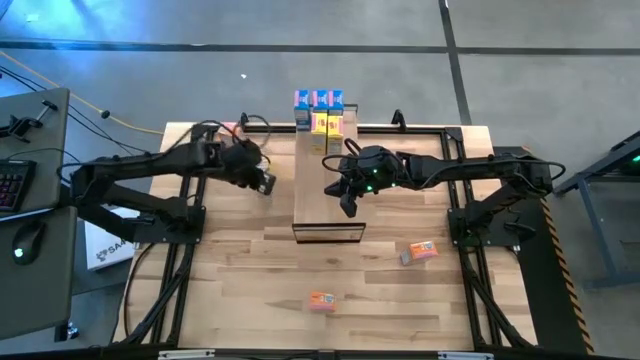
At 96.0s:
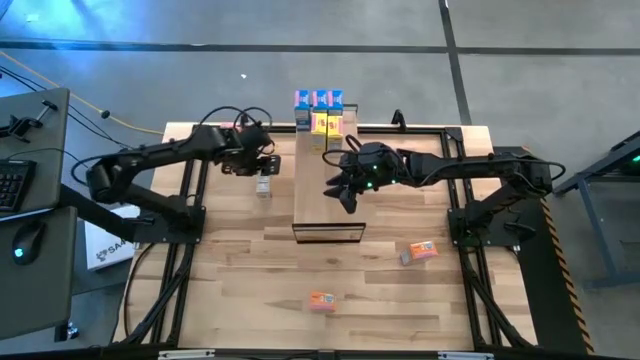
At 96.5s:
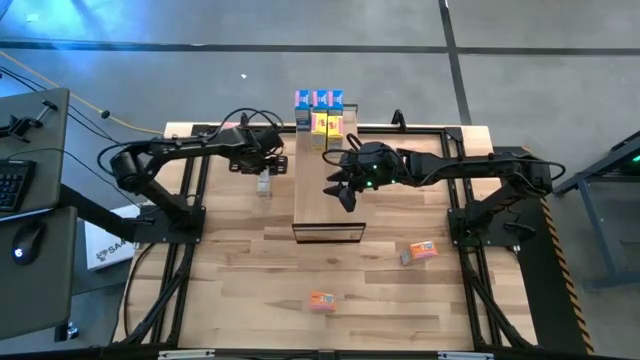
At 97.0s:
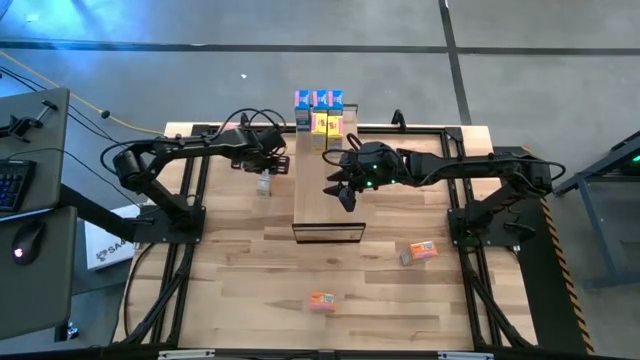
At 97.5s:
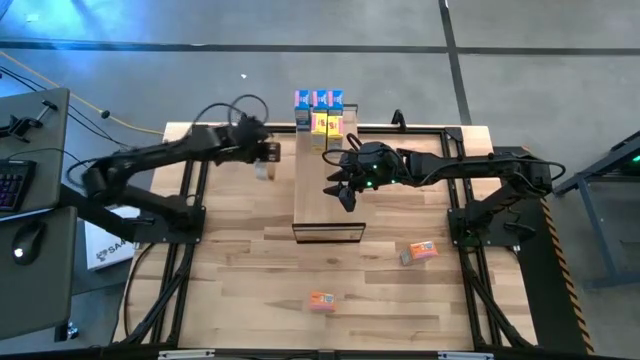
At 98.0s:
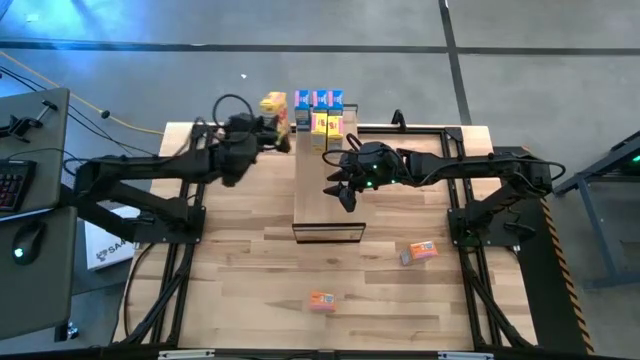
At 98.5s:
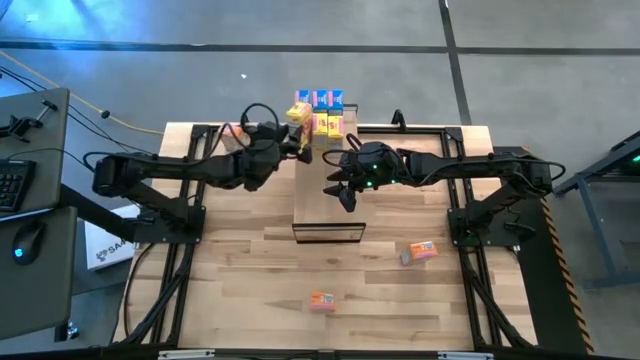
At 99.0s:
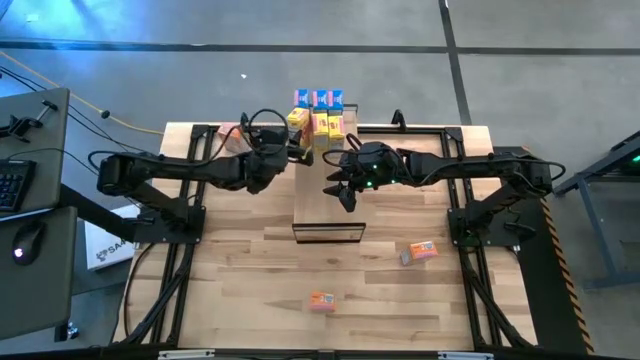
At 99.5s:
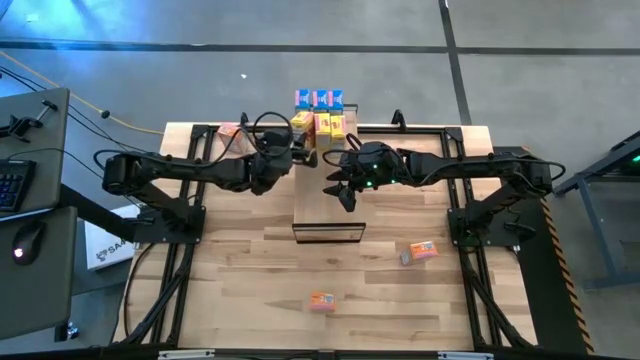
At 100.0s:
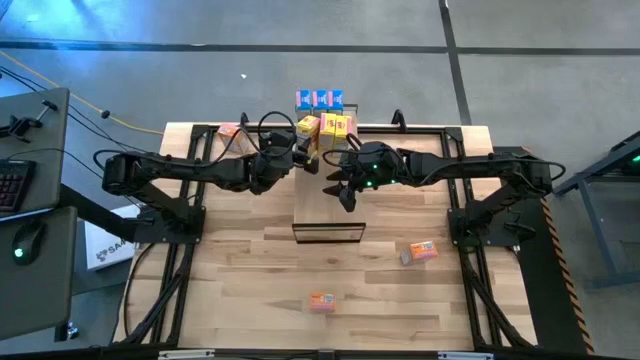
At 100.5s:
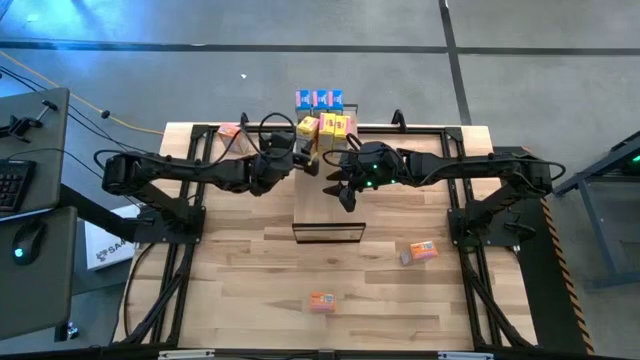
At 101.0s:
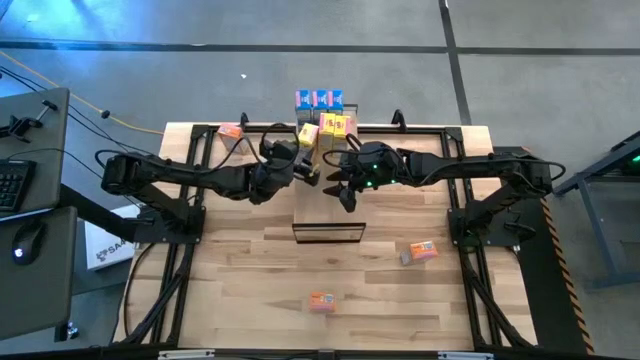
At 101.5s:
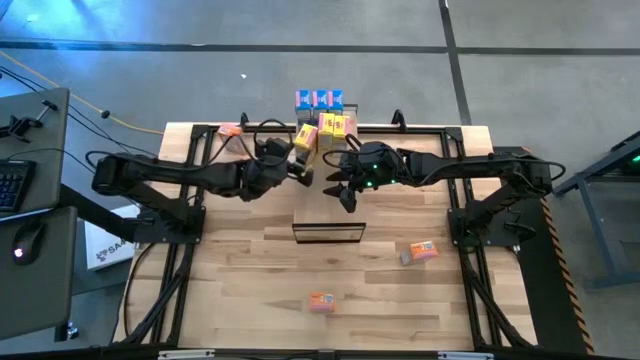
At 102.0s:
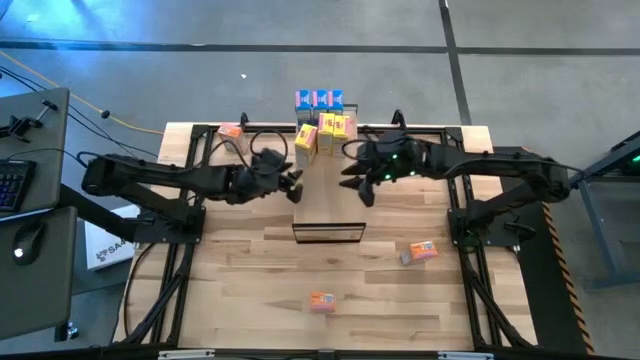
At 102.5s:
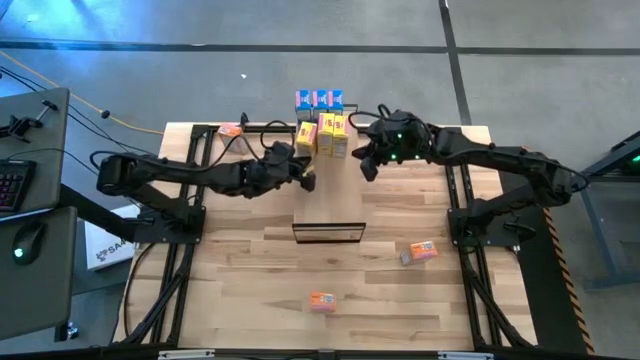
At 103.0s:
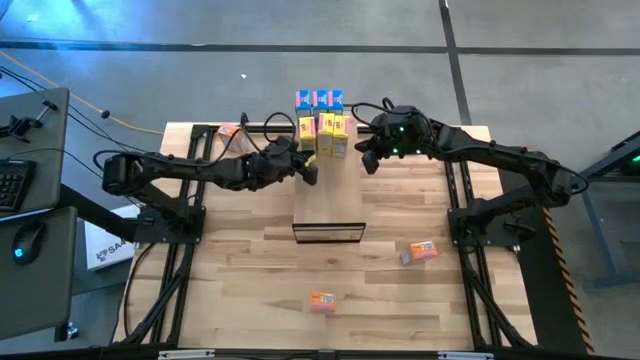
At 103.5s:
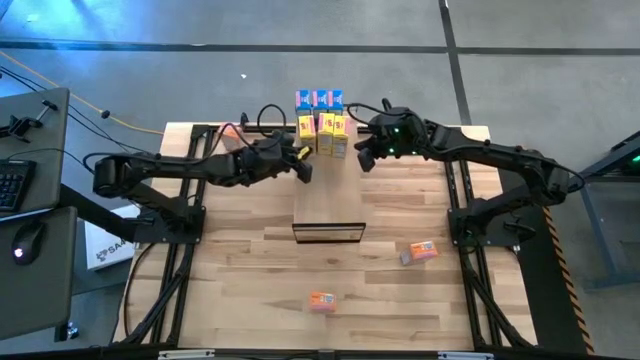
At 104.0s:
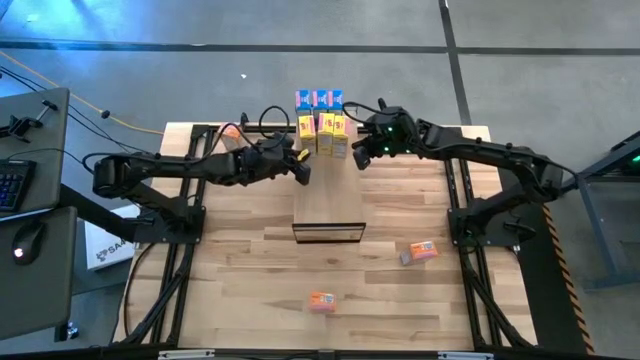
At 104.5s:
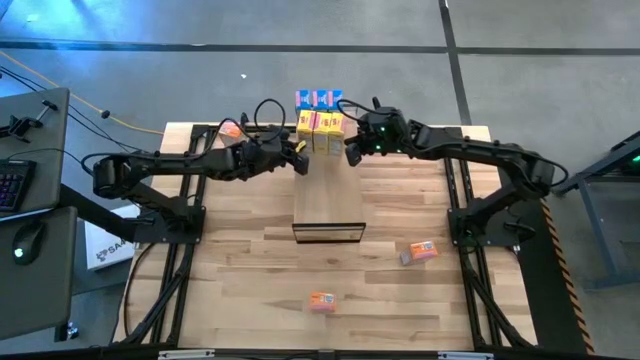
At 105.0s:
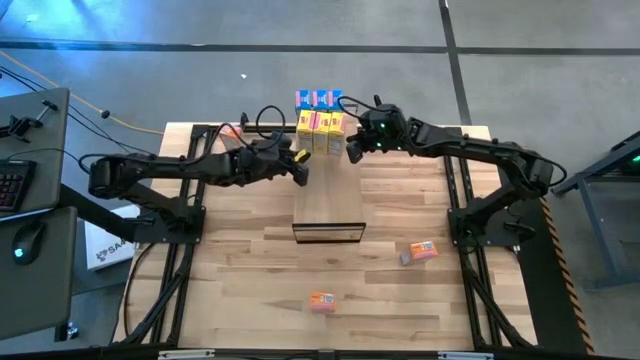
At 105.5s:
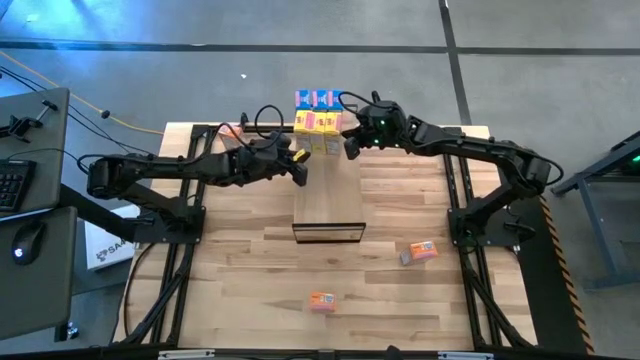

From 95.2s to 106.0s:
Task: Stack cereal on shelf
Put the yellow cereal box on the shelf aligned with the yellow cereal boxes

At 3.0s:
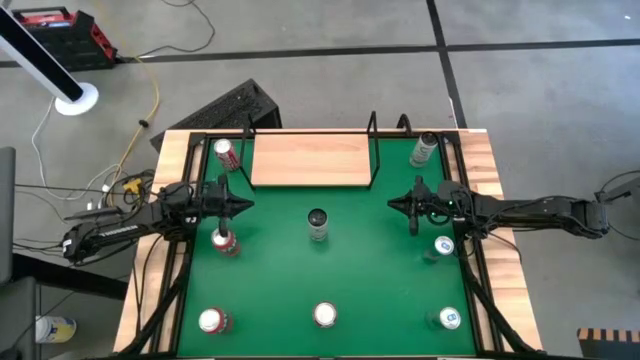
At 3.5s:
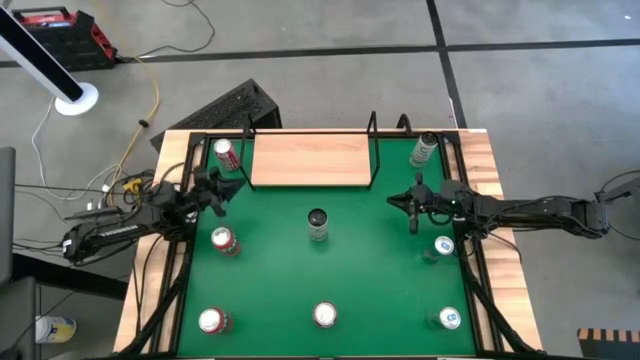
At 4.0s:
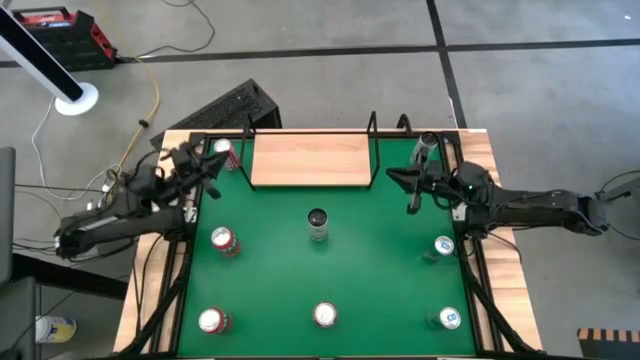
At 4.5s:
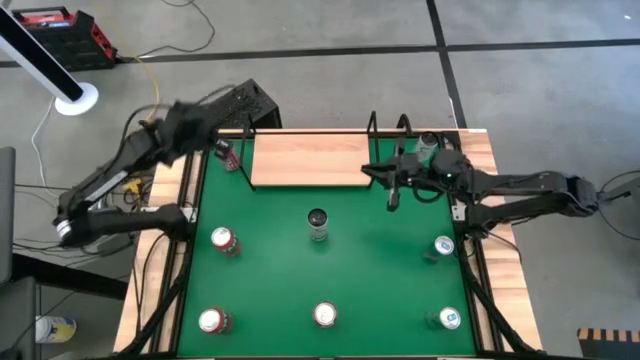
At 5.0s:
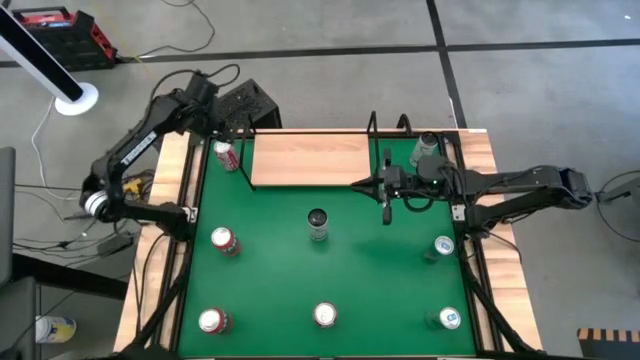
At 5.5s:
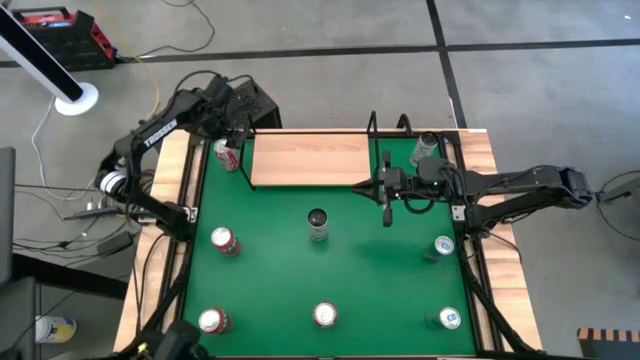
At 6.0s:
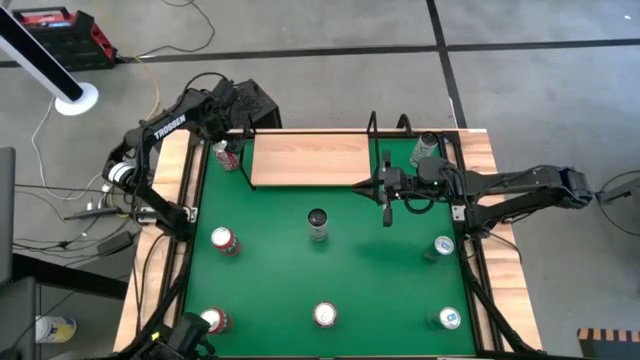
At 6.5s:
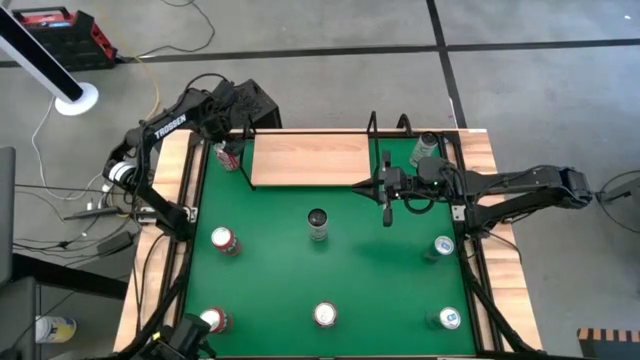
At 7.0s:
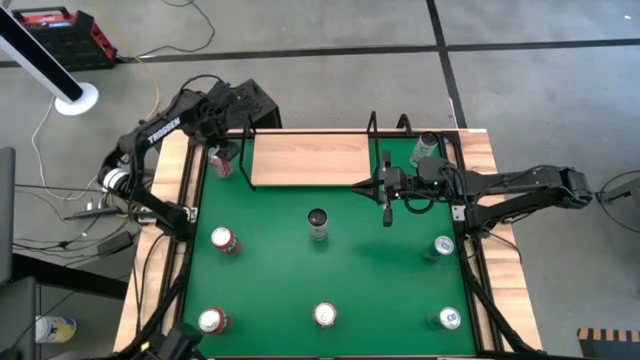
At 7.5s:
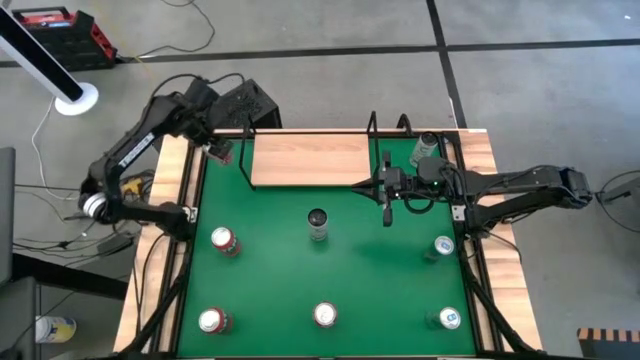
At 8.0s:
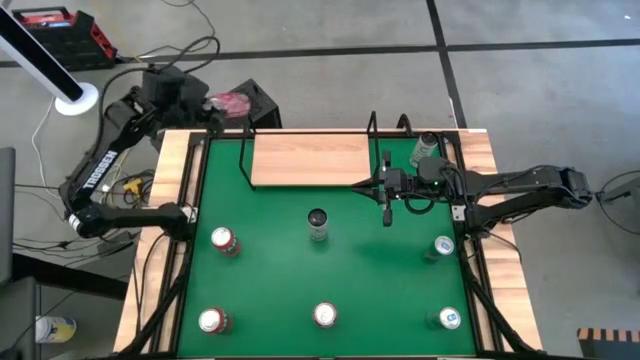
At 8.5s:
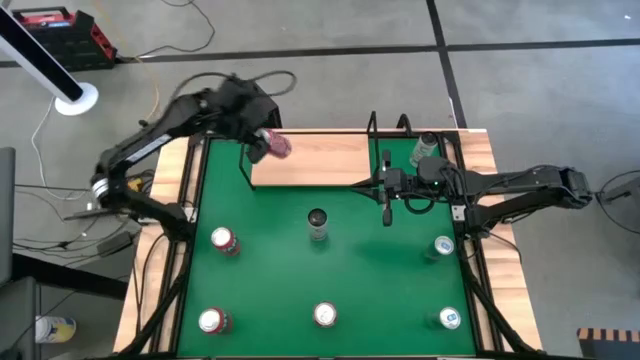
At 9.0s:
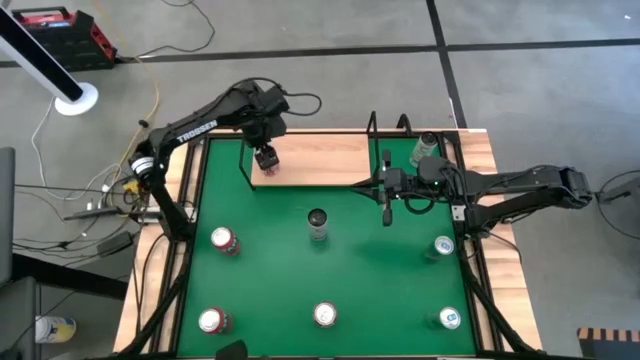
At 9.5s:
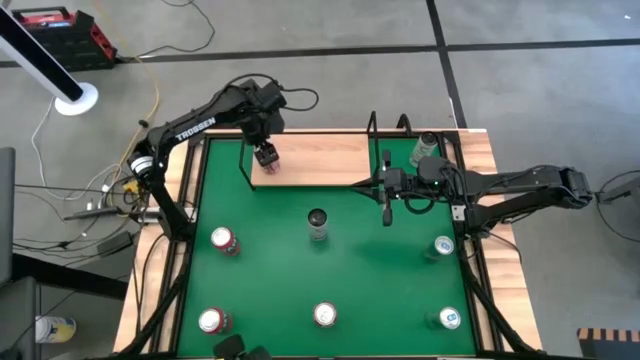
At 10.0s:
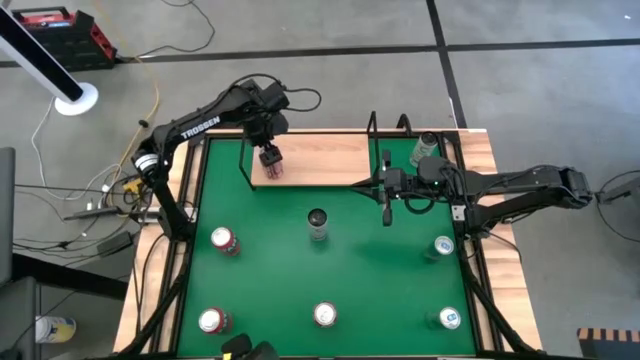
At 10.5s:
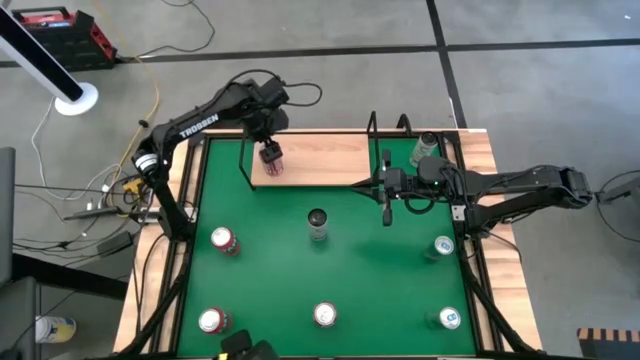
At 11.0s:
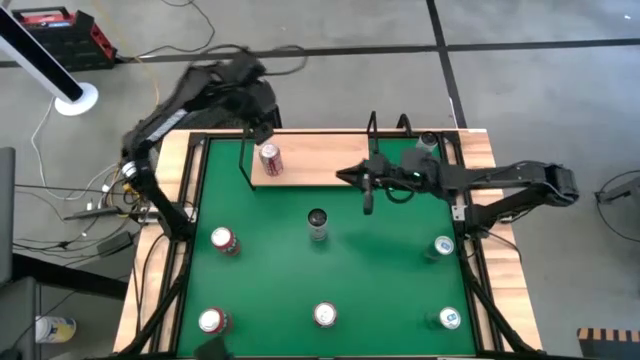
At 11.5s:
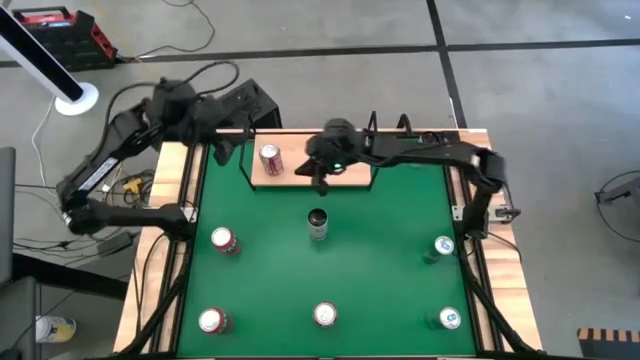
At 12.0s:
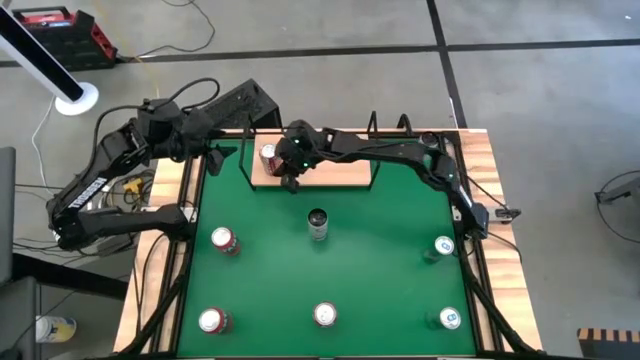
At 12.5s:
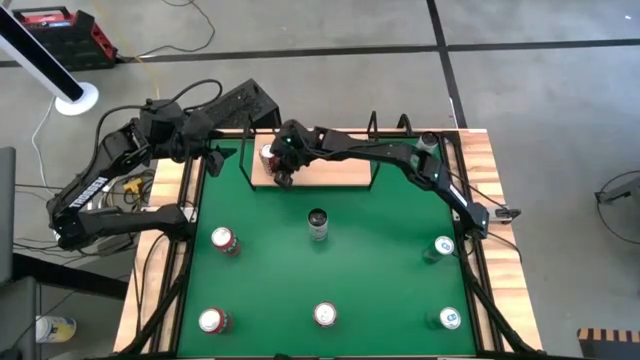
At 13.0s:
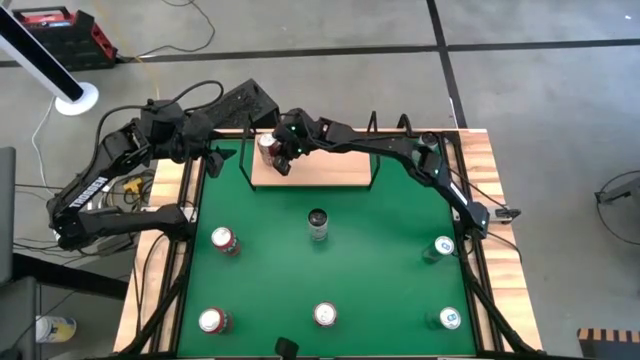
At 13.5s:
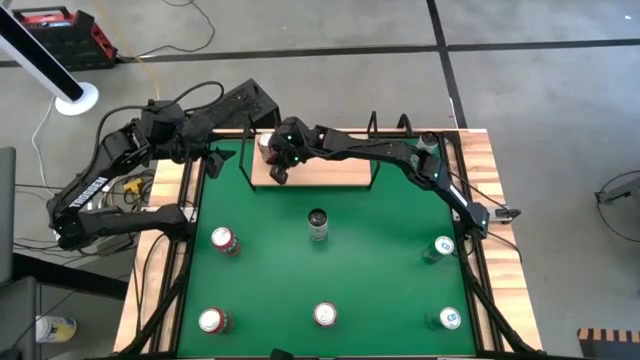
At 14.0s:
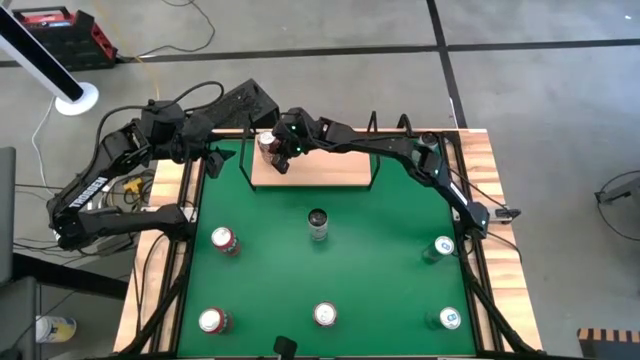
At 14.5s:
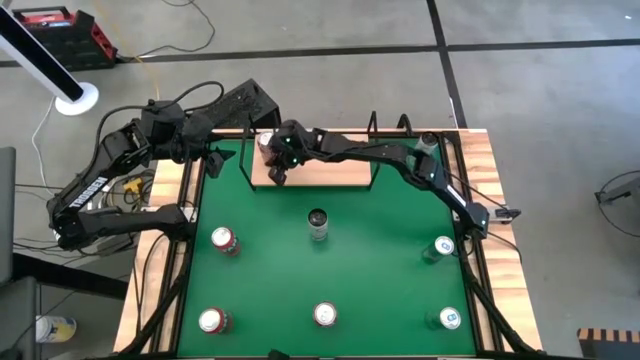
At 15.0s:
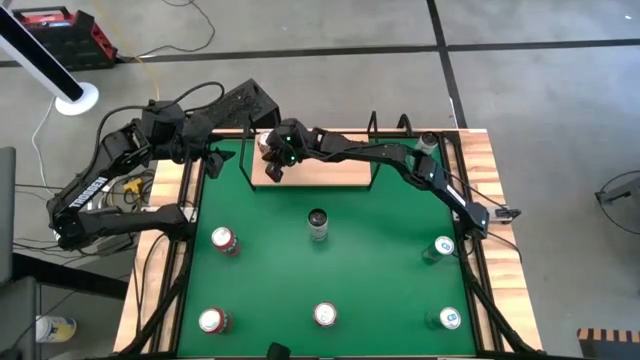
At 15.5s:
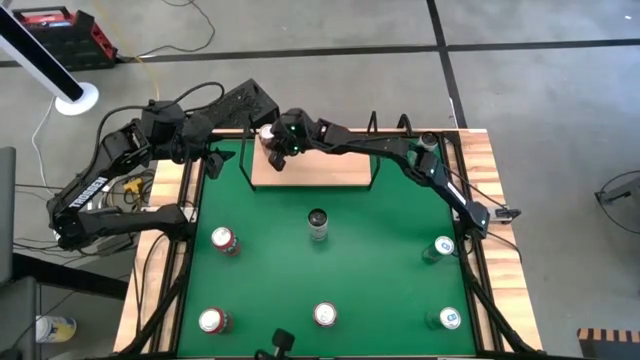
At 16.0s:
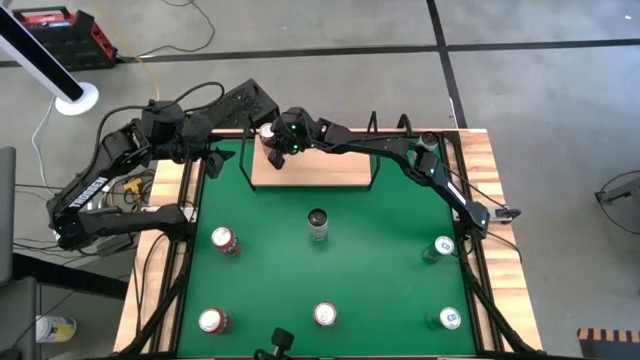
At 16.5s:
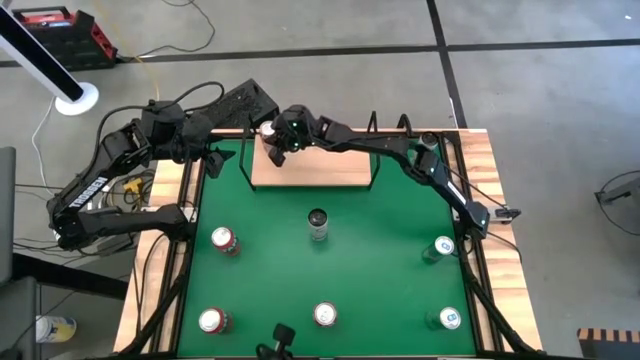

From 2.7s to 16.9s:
Task: Place canned beverage on shelf
Put the top red-white soda can on the shelf
